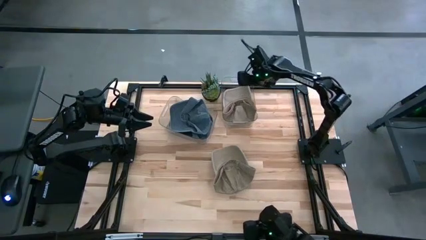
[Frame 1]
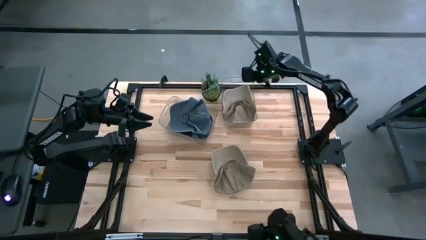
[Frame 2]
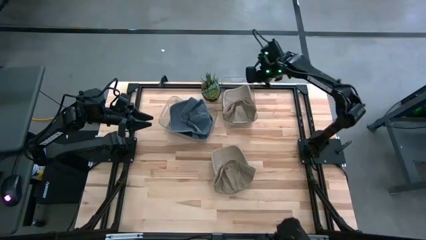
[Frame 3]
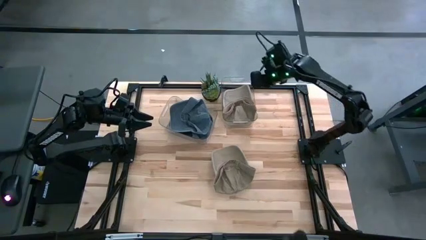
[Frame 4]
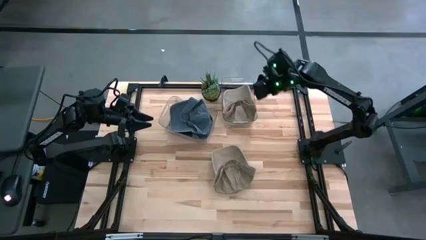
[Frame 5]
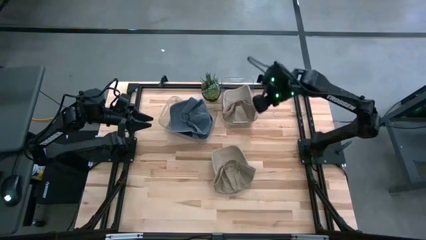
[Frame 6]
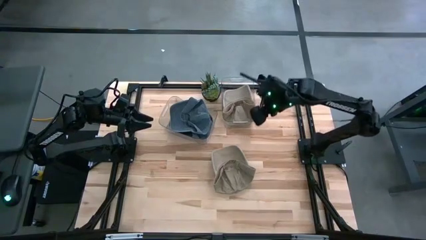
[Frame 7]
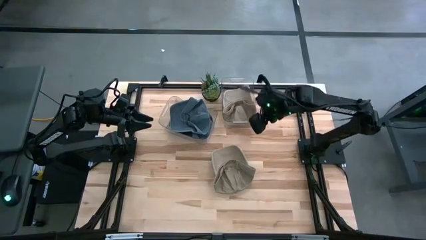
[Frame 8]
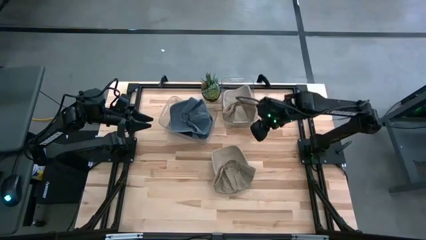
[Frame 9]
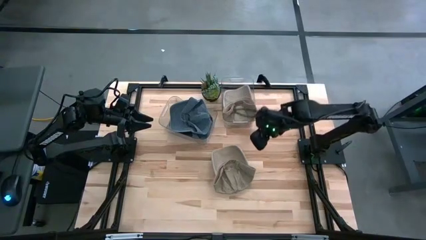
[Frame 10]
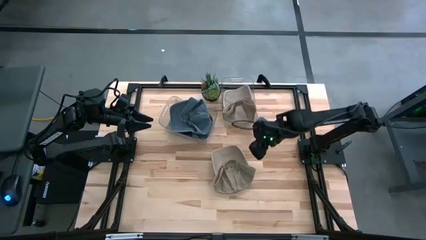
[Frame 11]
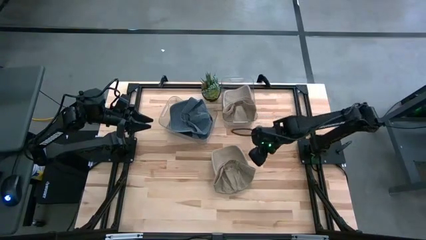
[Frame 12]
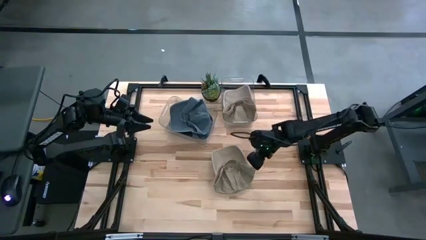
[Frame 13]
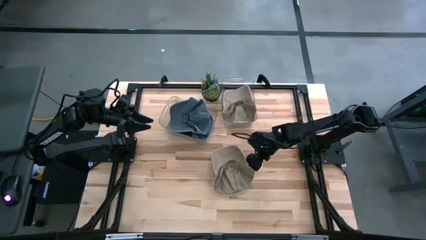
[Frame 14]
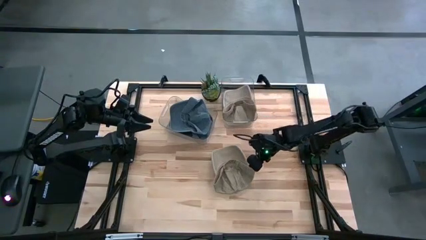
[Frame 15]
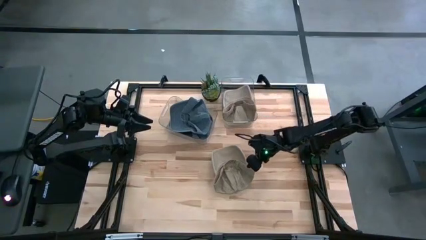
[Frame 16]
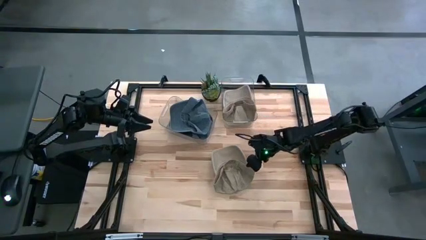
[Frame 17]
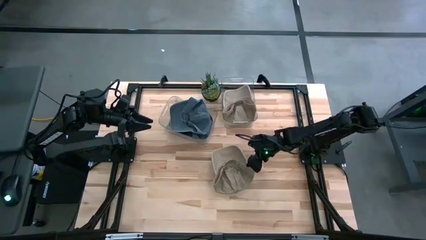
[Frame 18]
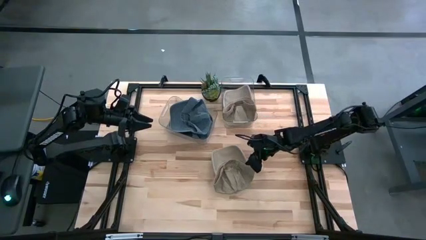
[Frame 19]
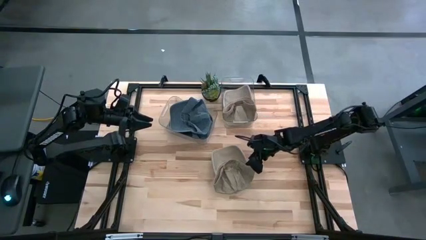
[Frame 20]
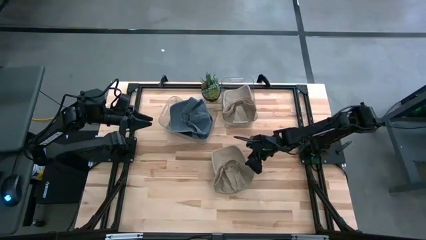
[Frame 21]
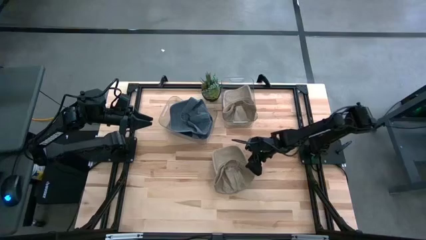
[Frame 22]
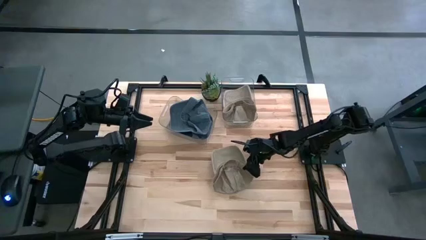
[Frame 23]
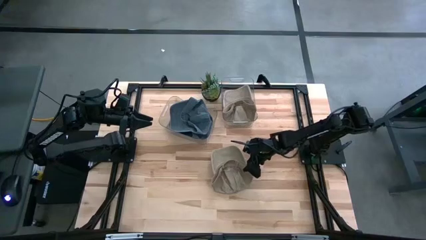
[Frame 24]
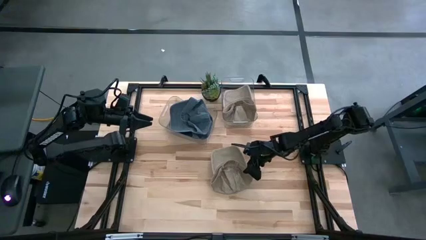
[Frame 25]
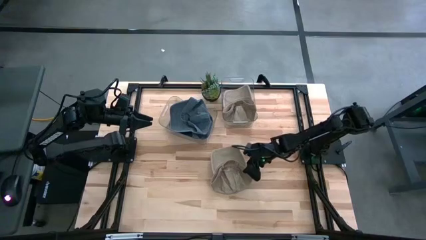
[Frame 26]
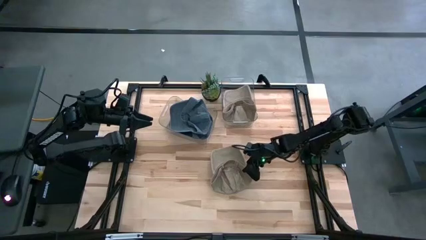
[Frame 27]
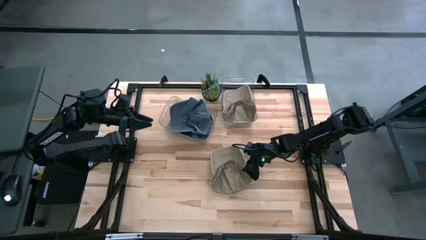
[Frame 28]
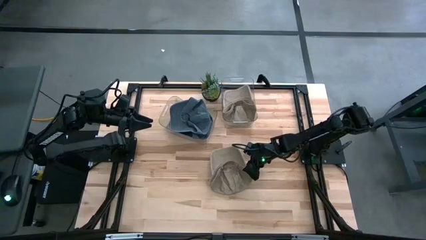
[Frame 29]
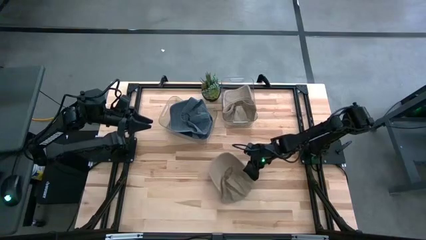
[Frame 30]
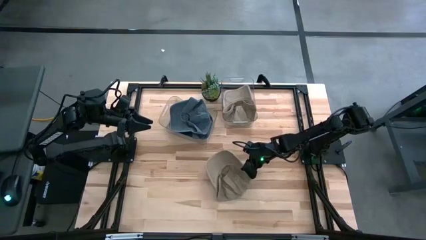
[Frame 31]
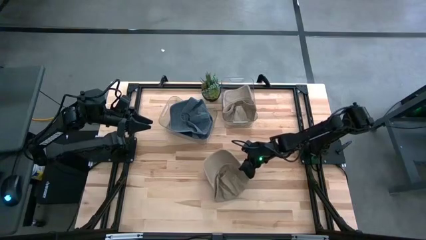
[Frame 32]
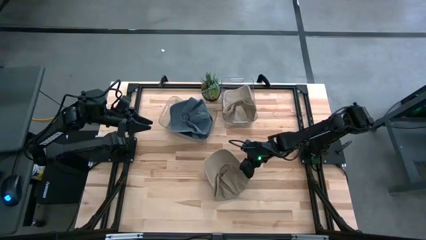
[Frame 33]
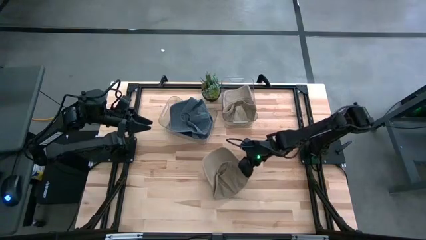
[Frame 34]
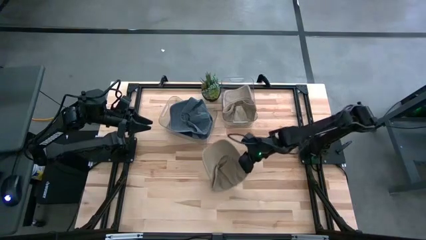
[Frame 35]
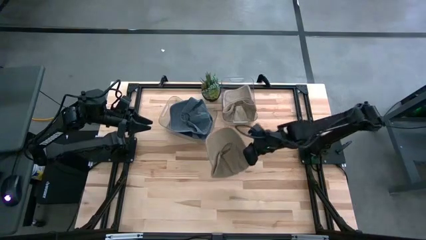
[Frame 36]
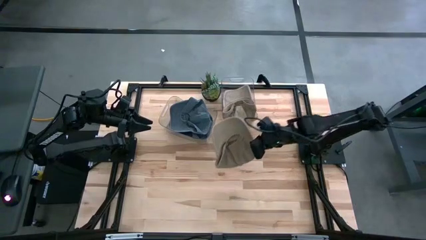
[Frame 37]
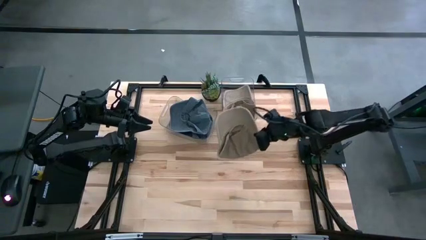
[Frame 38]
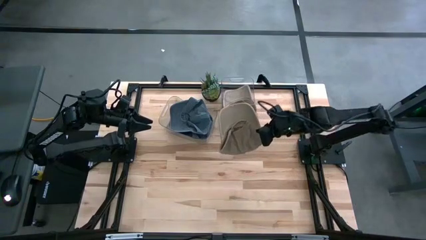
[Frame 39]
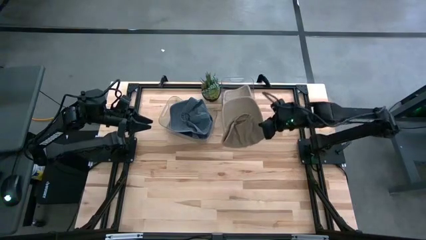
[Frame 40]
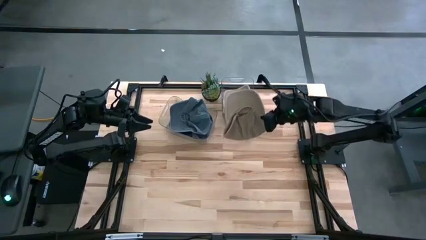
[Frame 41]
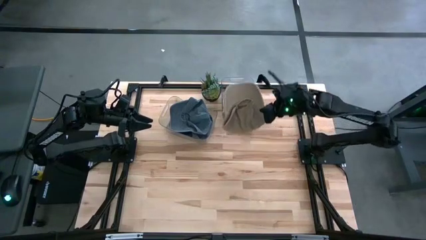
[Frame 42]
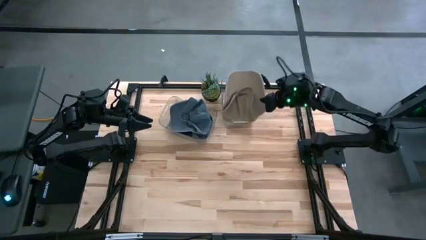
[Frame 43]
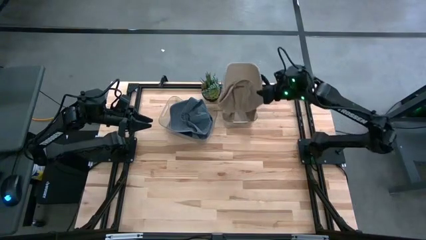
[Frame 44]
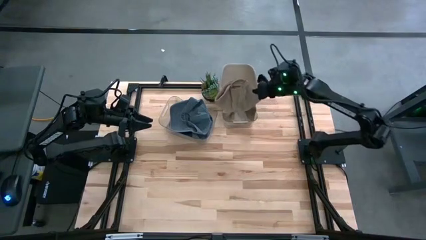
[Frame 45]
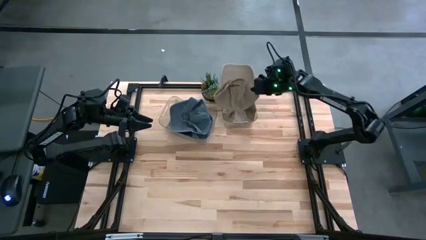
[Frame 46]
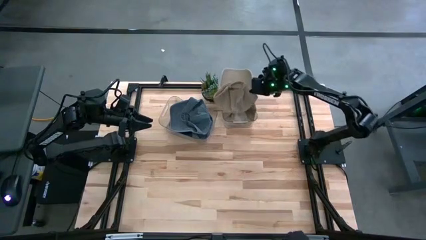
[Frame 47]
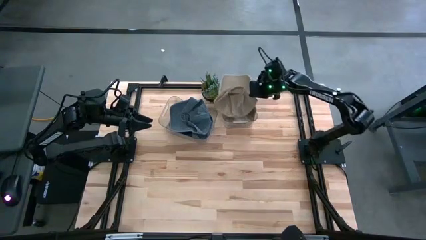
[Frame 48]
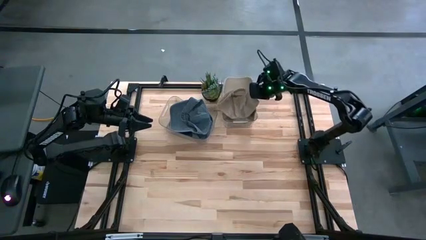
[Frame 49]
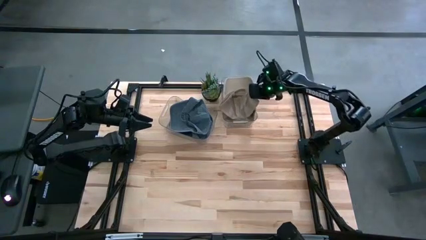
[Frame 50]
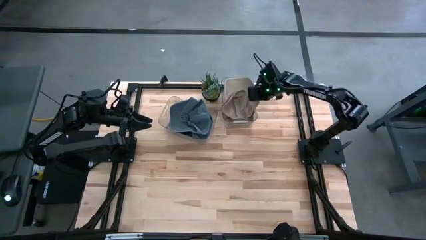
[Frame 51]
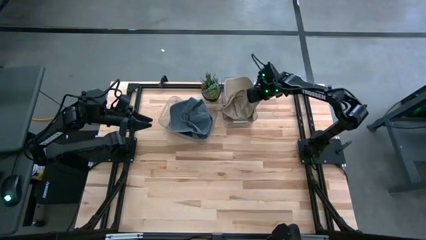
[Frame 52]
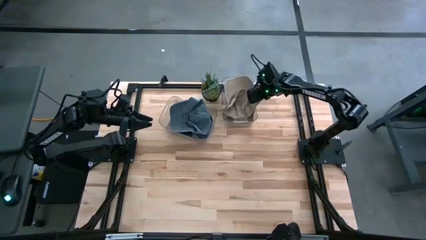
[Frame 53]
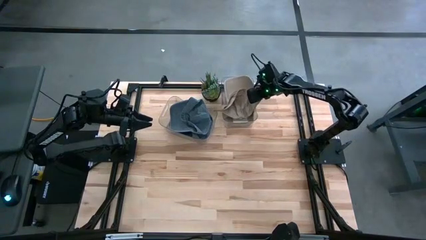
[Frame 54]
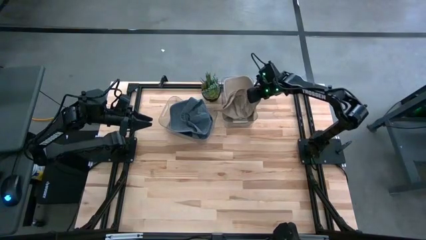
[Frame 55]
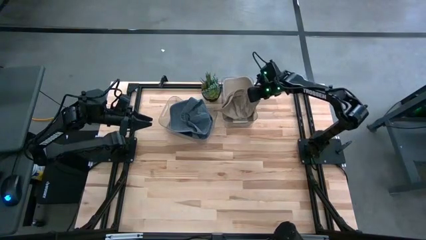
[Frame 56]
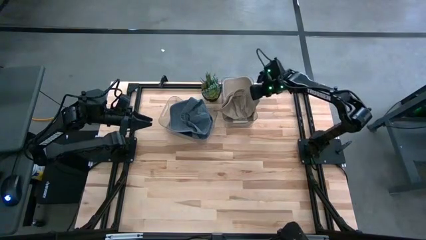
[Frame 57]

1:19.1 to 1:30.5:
Task: Pick & Place hat
Put the brown cap into the right transparent bin

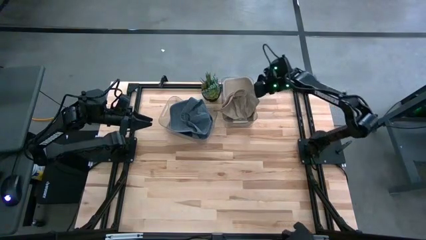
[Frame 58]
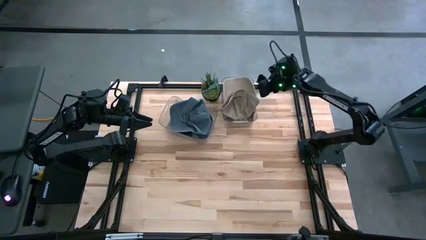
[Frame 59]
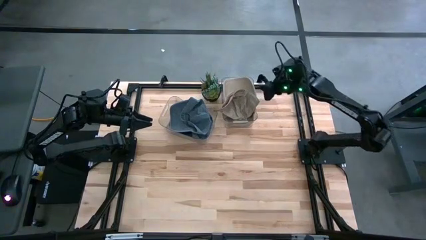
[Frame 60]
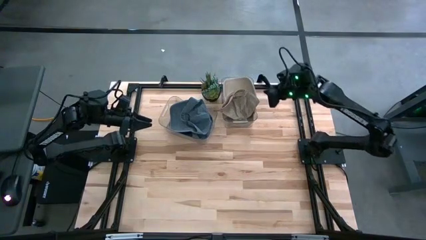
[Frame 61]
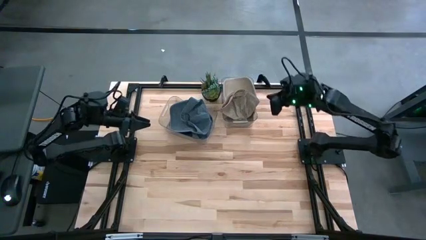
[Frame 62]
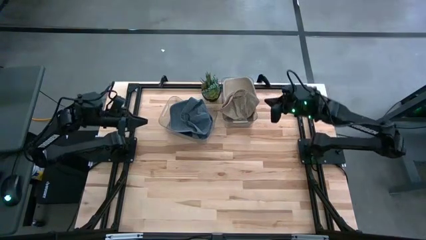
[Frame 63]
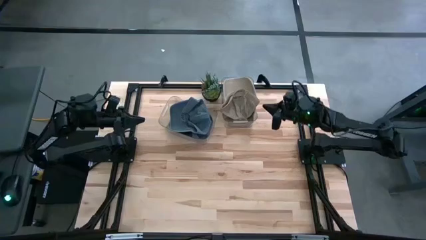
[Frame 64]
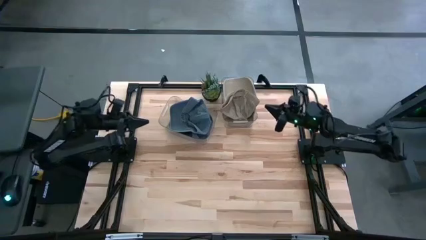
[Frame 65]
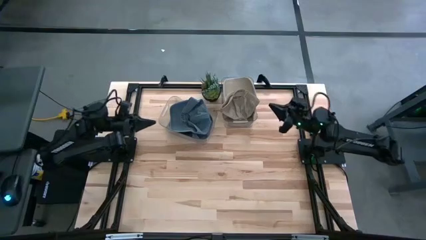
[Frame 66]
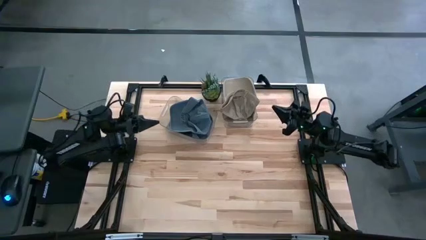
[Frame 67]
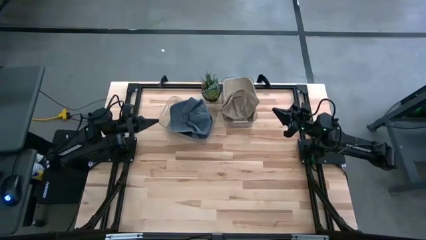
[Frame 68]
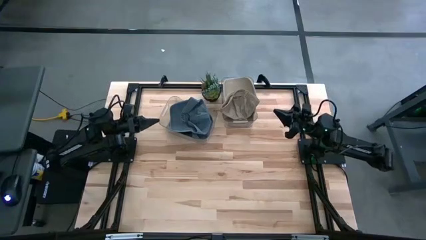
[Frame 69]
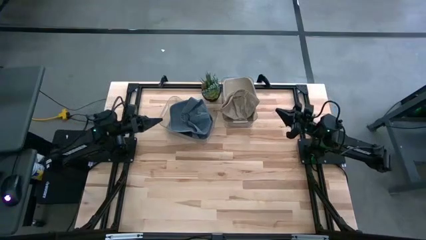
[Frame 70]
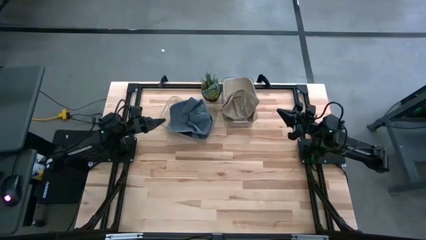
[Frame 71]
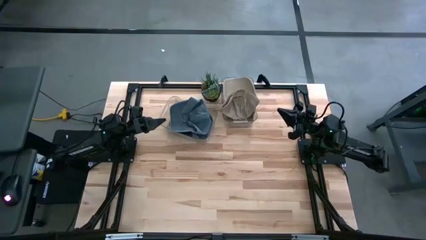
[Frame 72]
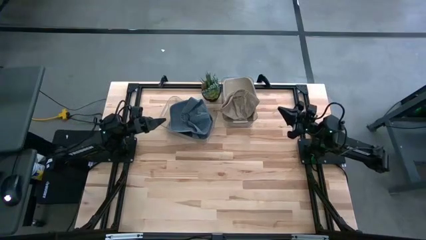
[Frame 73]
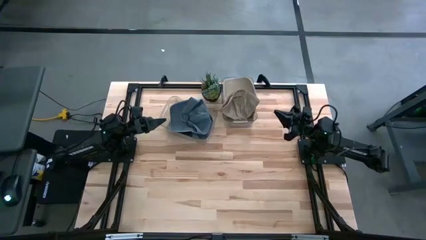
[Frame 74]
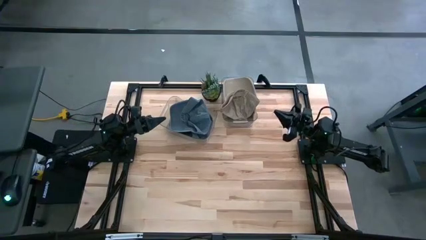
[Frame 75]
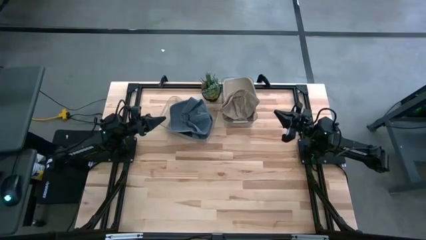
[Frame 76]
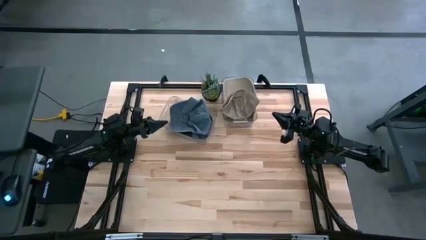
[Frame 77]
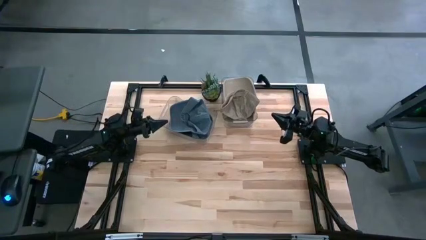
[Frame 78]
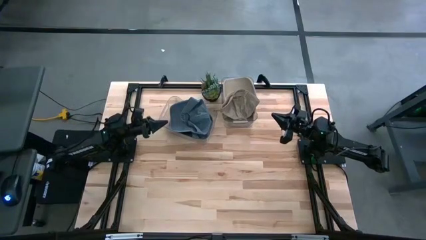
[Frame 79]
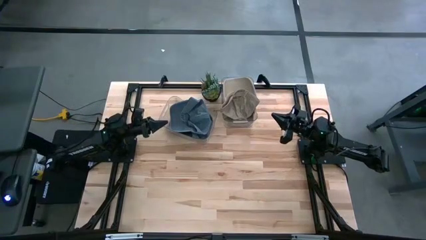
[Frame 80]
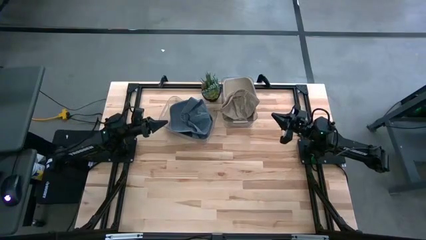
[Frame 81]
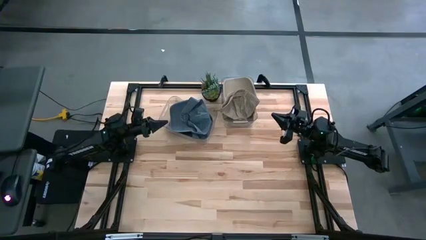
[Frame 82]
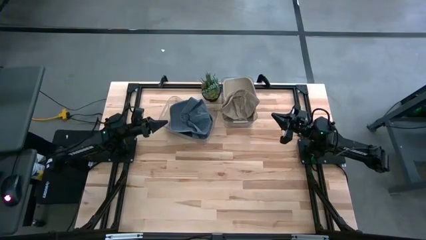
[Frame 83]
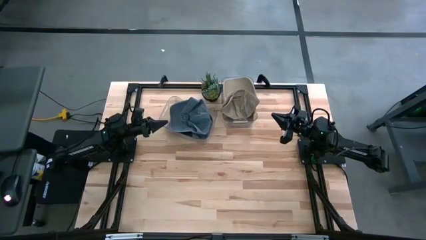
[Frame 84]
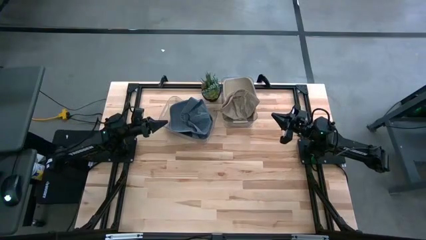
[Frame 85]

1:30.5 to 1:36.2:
Return to Home Position
